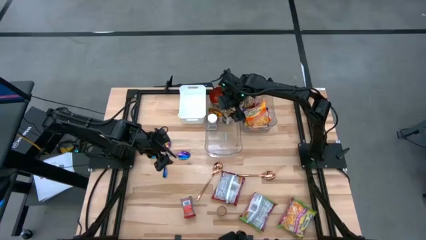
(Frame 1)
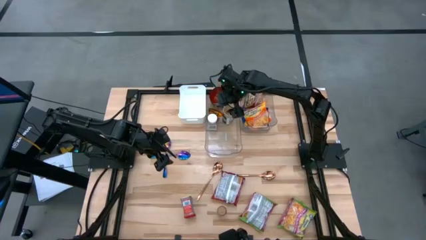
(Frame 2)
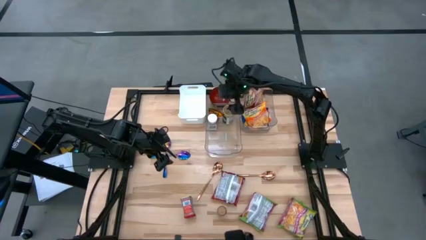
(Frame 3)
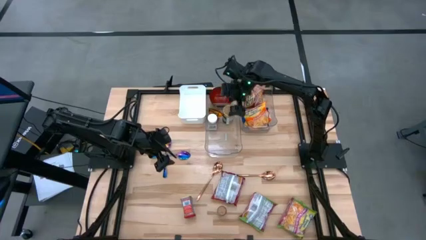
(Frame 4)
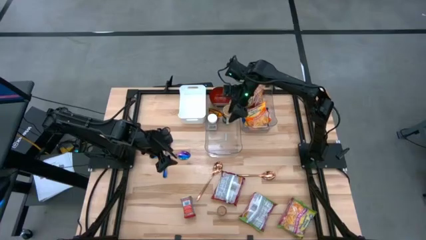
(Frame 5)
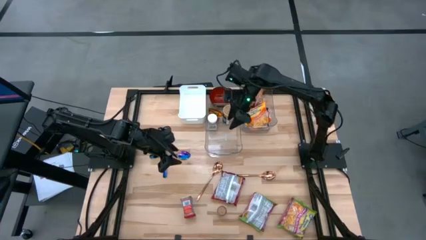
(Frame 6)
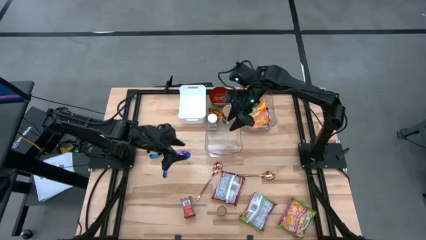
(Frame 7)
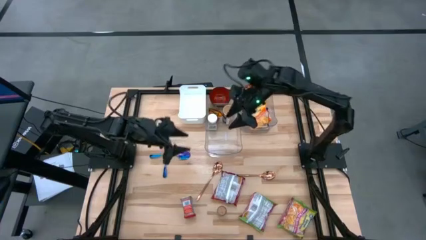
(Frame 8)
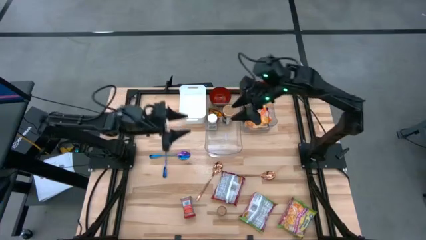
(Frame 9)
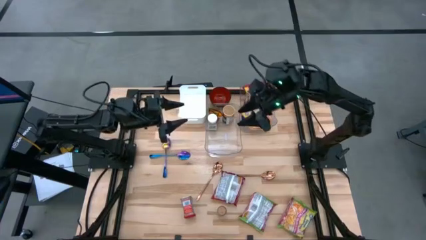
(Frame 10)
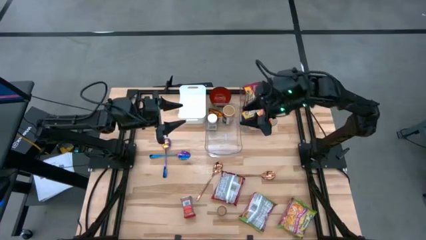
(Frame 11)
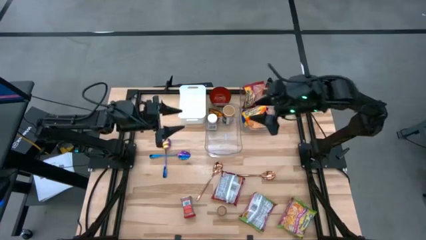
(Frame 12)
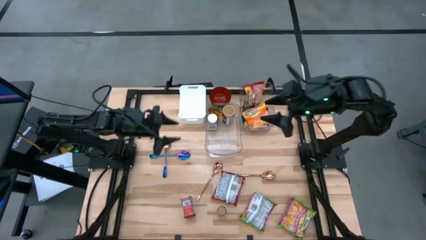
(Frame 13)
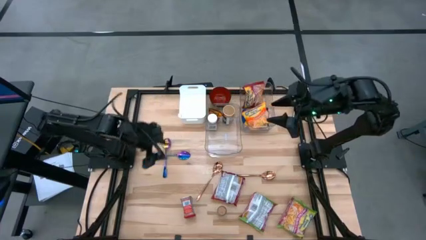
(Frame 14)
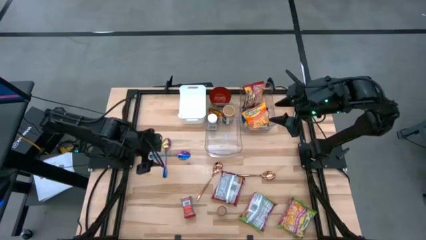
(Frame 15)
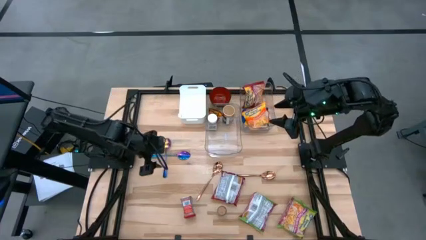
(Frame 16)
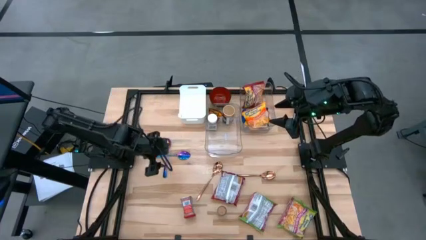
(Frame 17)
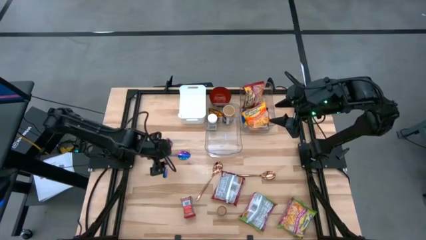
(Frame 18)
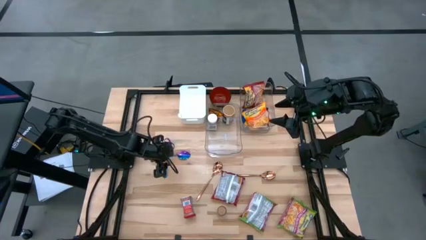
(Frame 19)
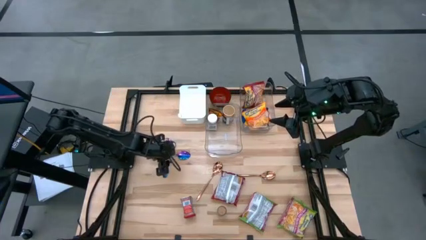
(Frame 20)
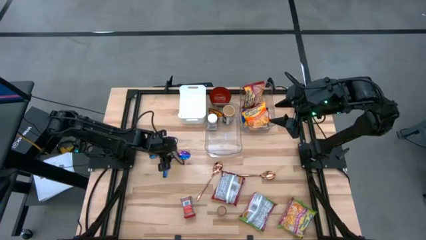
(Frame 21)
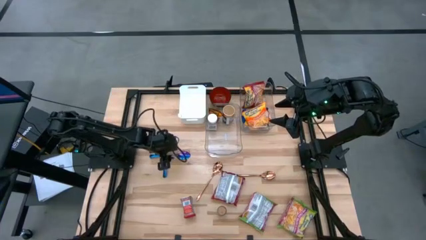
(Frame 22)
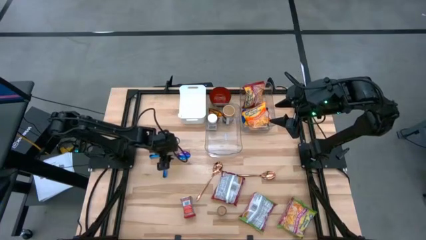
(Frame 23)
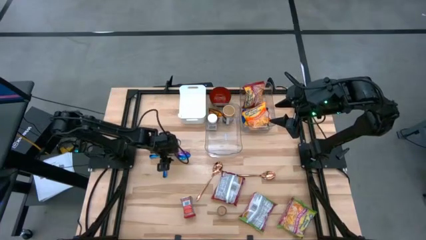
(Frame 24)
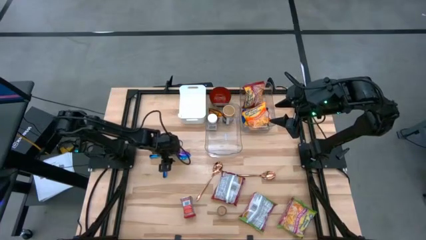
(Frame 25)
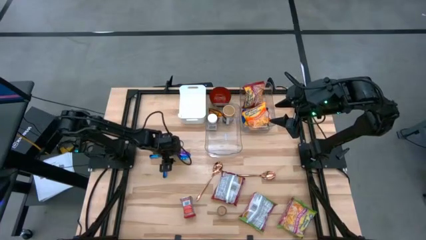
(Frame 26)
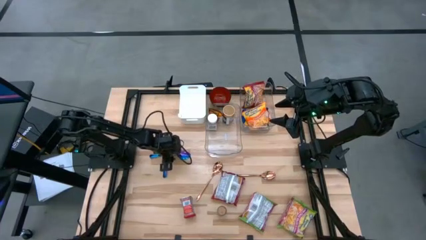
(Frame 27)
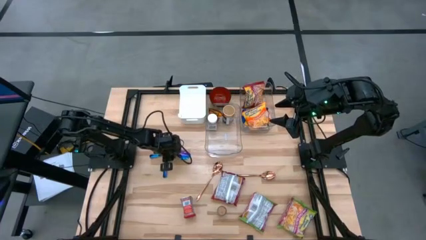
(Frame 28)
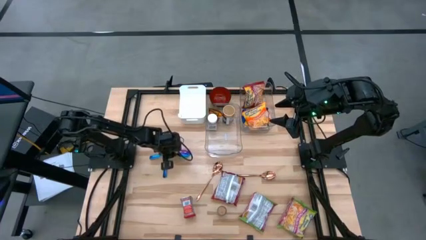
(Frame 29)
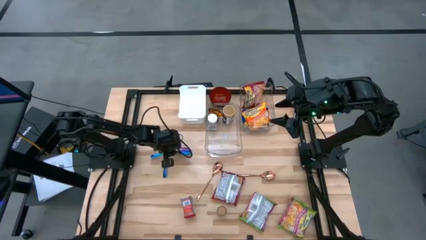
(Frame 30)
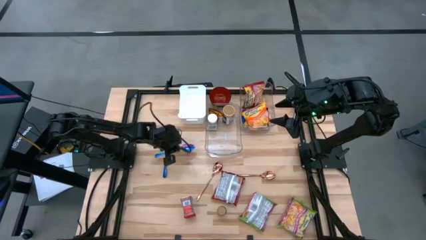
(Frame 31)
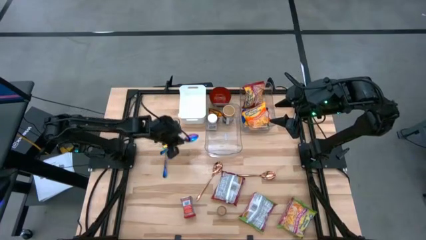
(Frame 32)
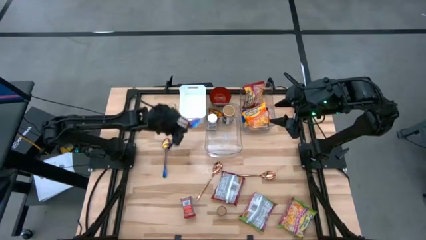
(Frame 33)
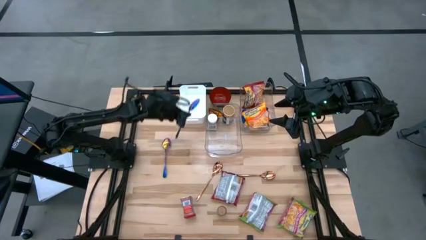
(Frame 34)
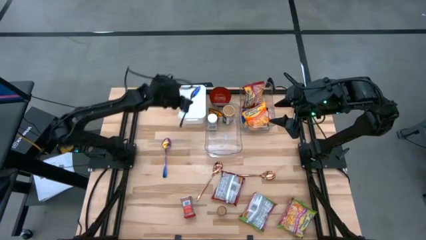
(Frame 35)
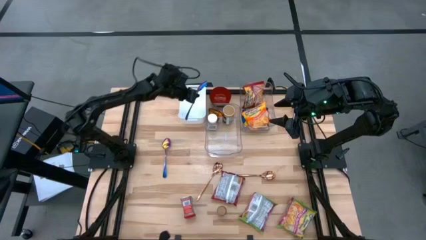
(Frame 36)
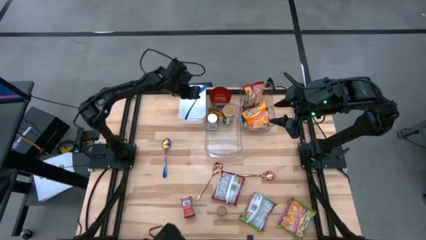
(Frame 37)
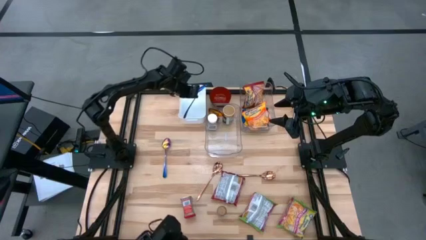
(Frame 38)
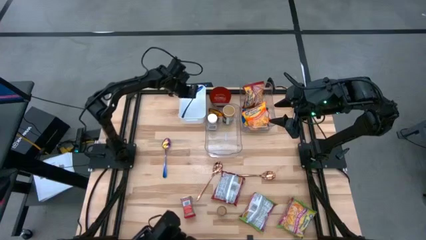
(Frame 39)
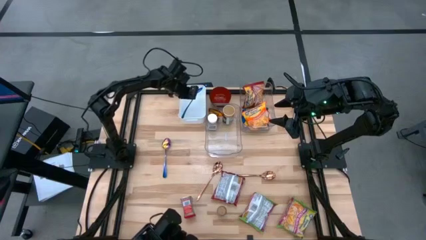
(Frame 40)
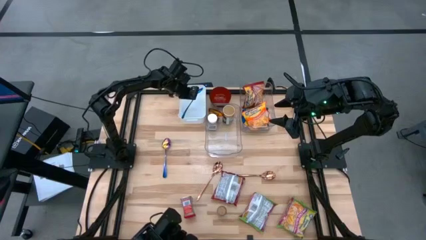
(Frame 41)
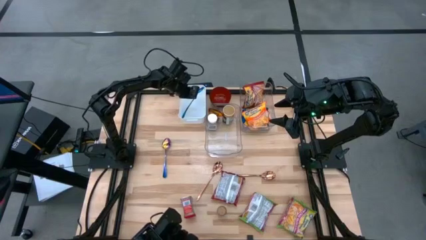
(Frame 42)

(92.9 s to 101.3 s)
Task: Pick & Place Food Item
Put the bottom blue spoon into the white bin

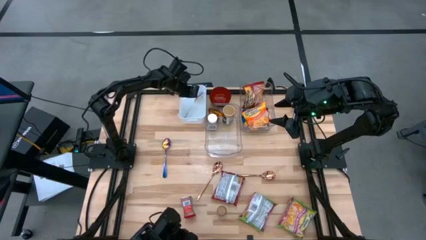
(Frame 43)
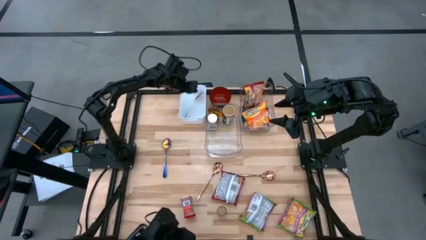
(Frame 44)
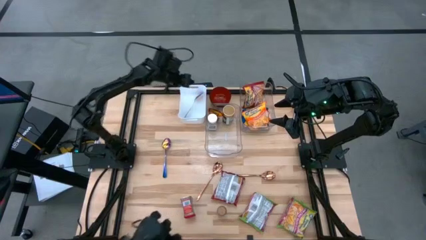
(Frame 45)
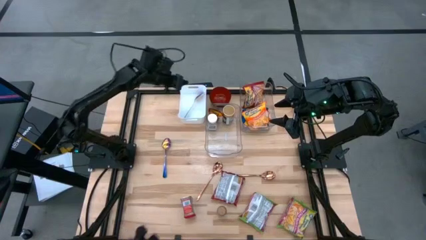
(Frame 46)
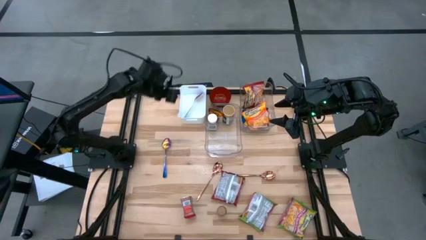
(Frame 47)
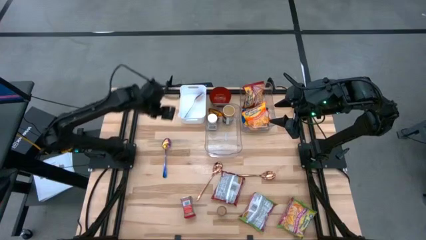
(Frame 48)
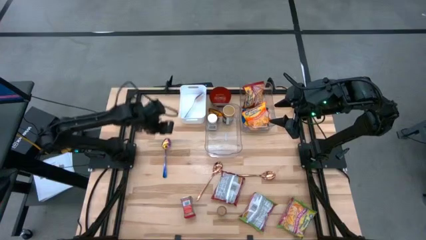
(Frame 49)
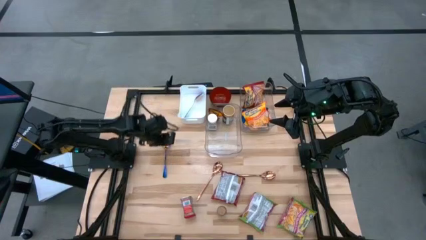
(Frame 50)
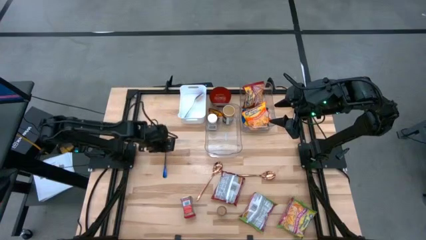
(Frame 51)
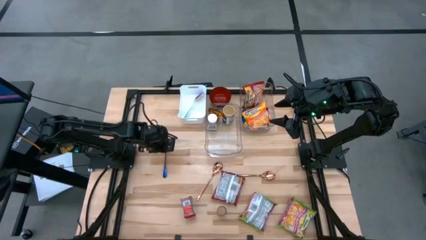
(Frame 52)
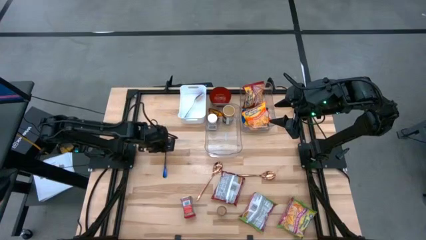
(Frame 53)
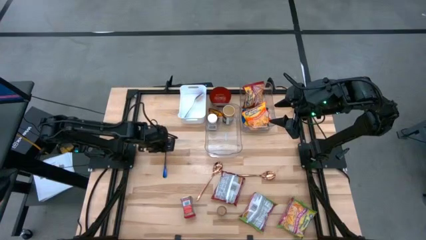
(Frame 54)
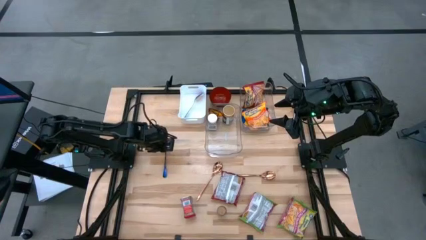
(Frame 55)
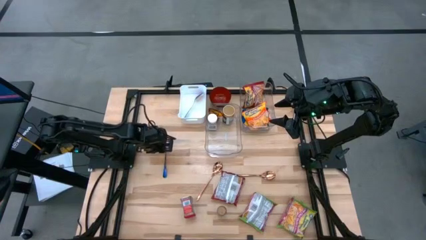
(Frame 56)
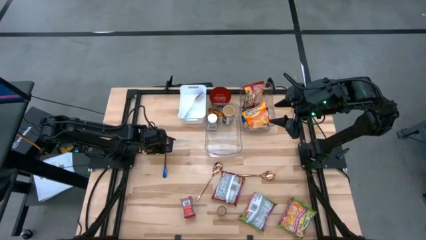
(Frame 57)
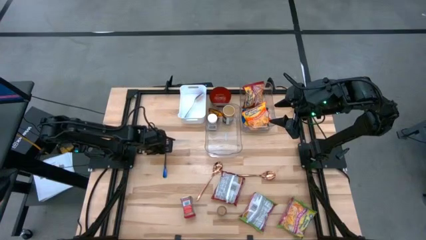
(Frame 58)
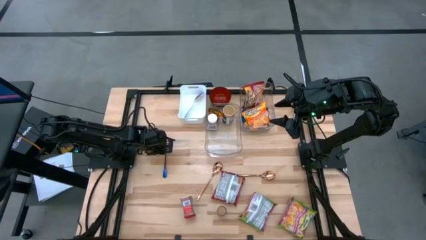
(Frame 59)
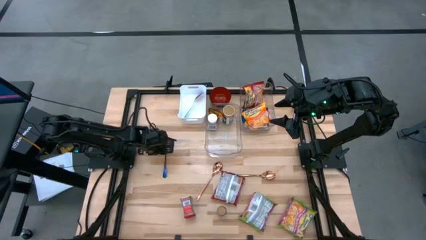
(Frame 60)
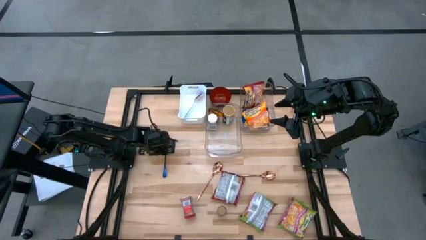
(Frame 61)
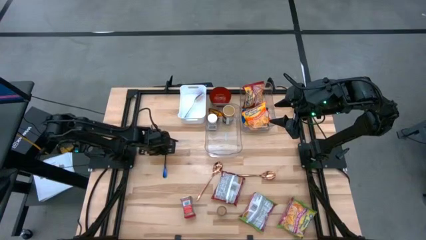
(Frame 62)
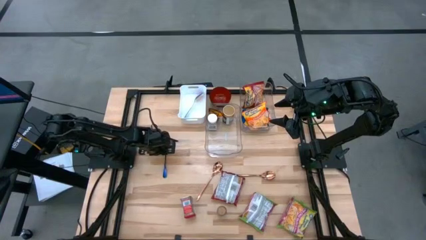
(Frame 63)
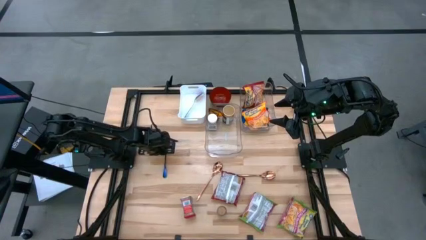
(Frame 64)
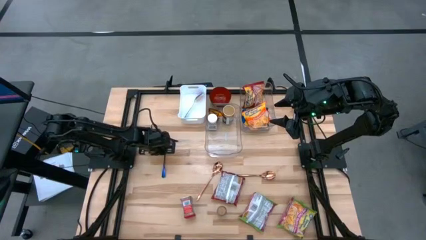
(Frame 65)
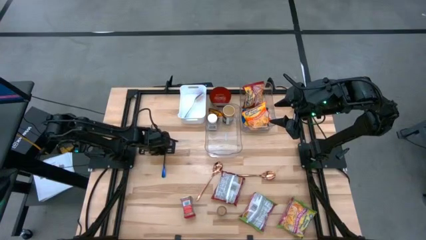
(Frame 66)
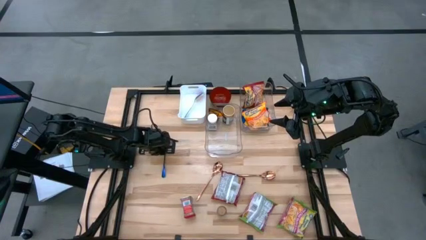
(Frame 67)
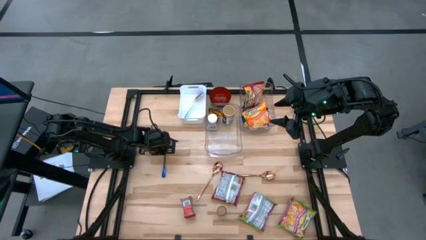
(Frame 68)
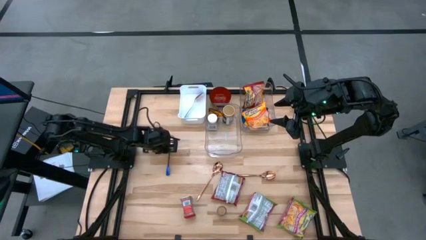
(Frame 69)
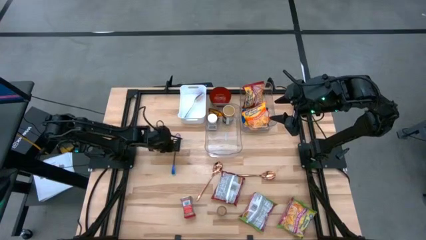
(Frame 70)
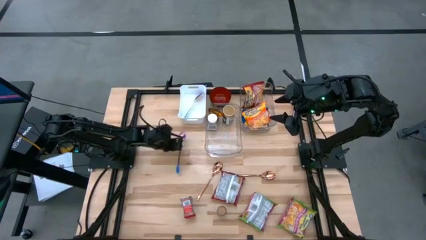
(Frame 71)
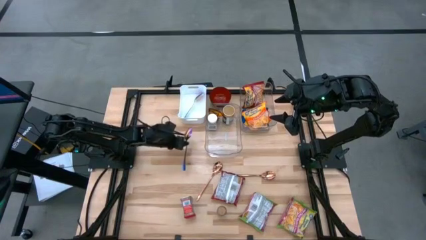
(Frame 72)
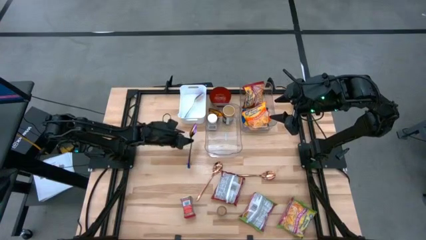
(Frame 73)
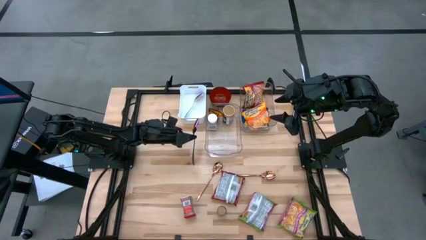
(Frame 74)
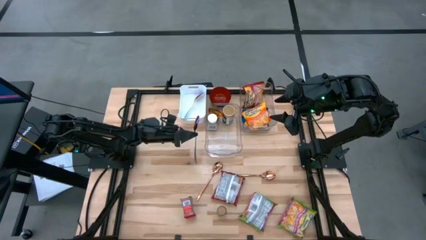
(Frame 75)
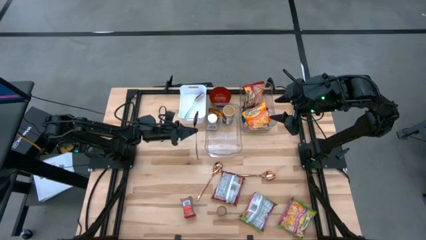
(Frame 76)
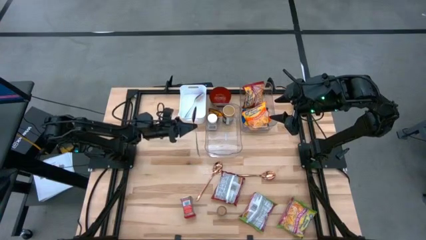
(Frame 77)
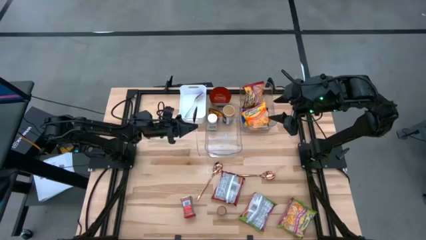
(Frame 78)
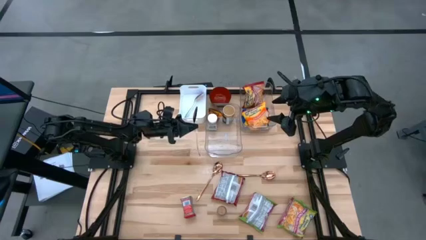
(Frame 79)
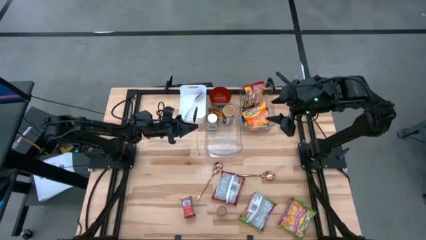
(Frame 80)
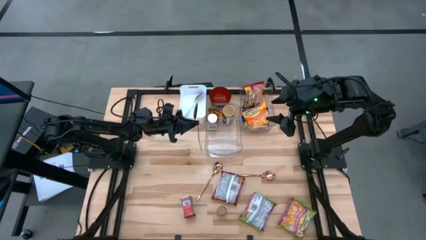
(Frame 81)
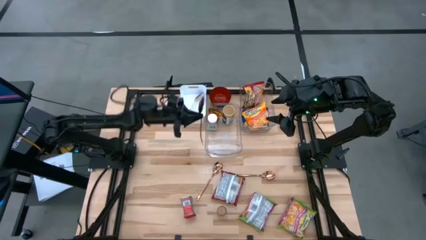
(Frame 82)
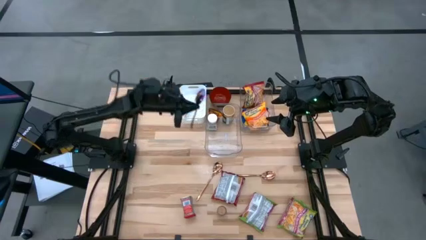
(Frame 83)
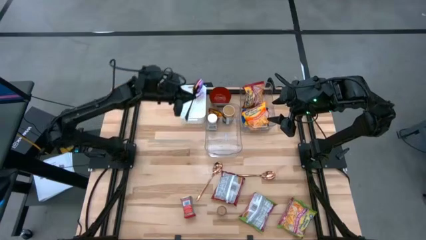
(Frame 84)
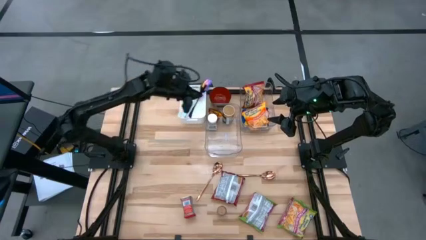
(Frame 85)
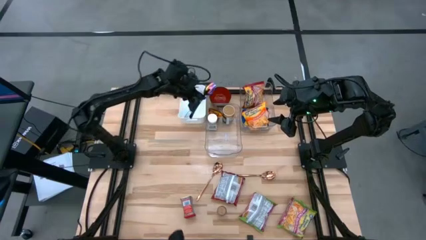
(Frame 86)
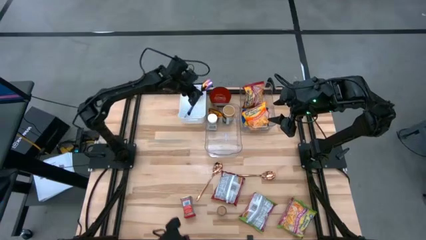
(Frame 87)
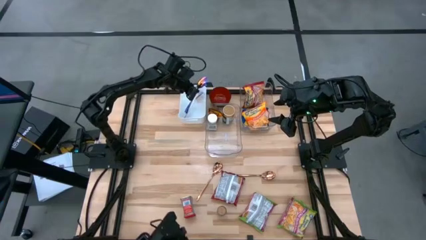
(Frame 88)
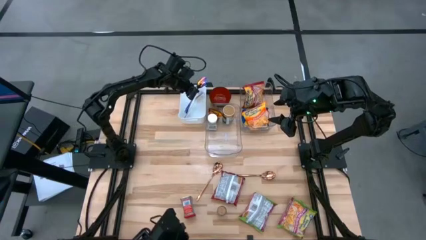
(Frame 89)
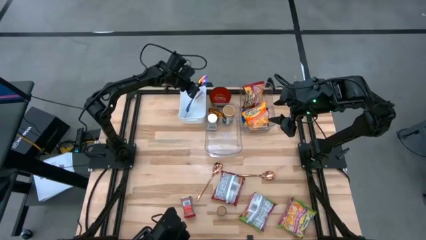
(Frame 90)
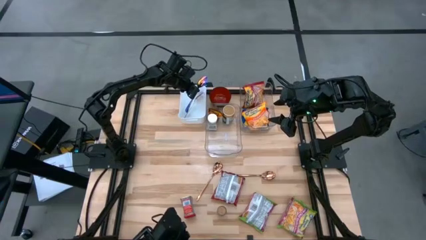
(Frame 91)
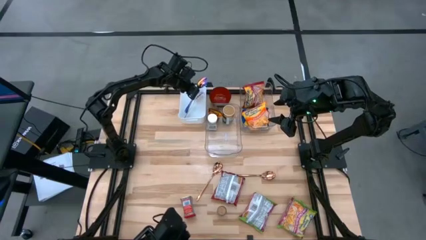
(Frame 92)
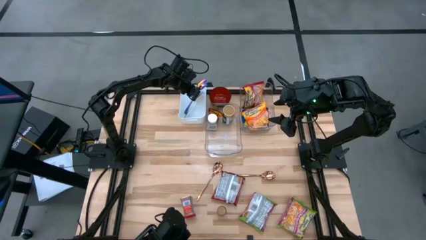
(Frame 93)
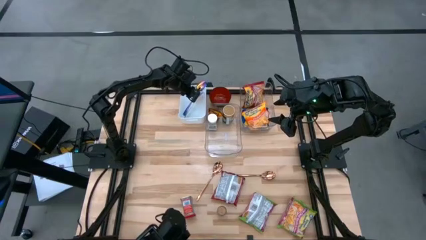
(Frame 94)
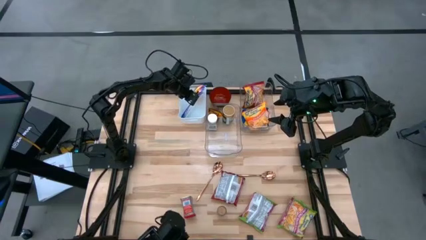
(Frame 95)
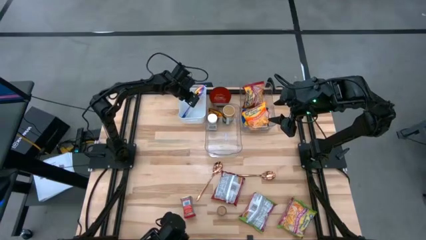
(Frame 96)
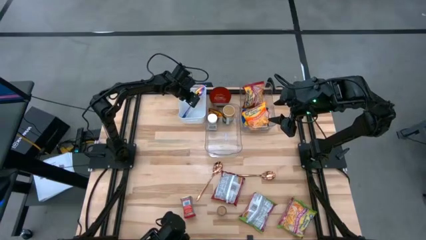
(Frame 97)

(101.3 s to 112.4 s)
Put the blue spoon into the white bin
